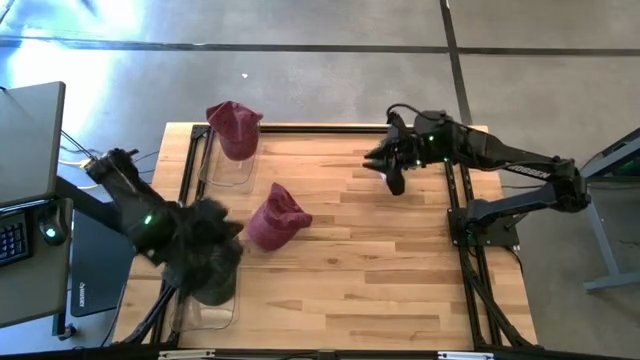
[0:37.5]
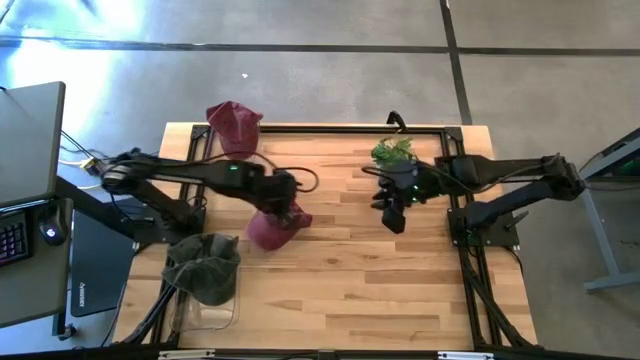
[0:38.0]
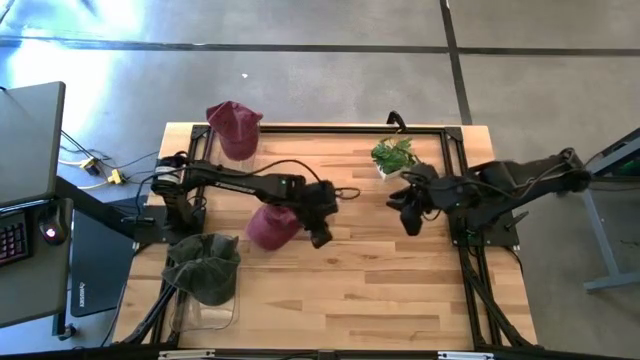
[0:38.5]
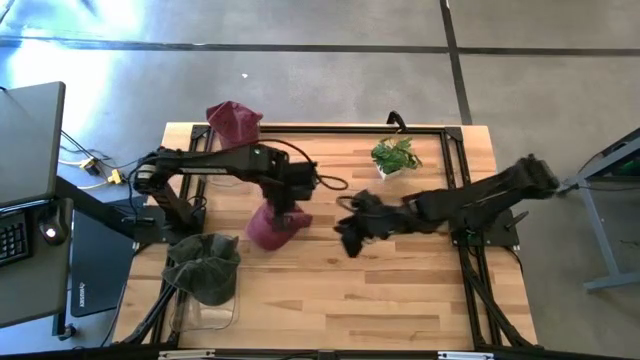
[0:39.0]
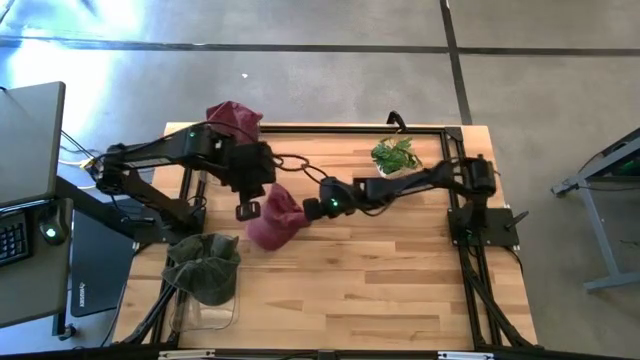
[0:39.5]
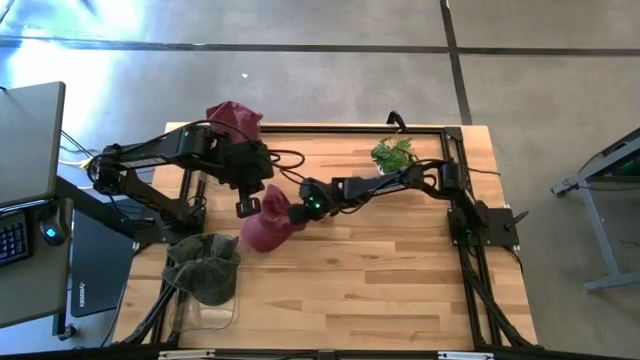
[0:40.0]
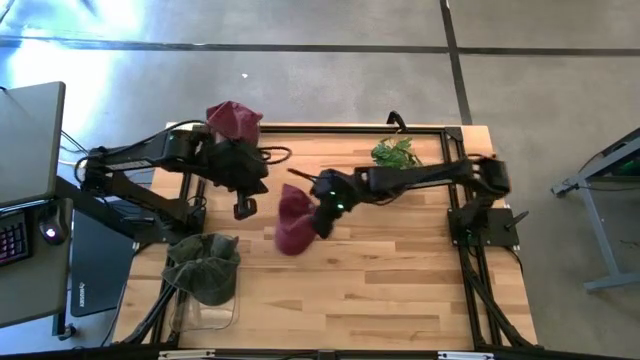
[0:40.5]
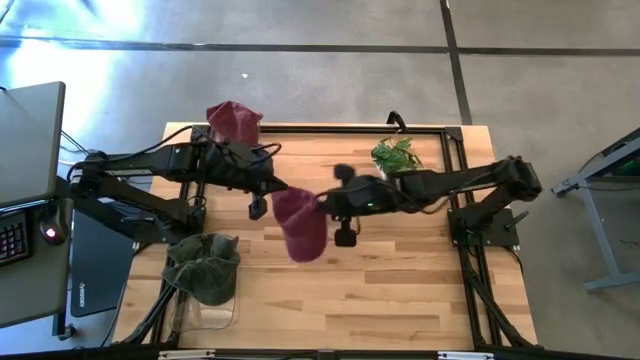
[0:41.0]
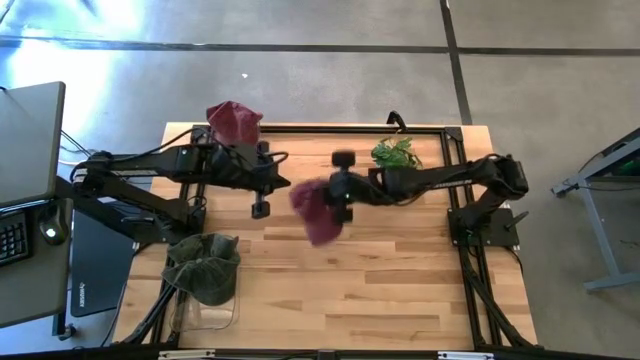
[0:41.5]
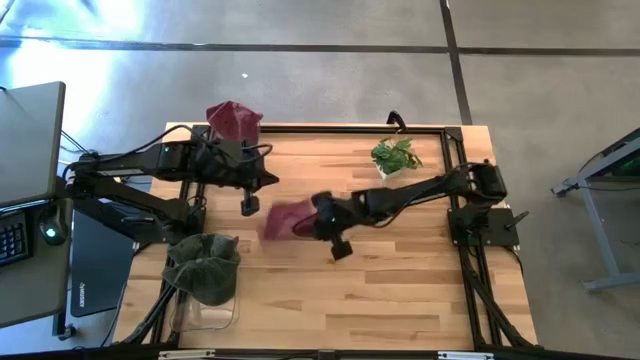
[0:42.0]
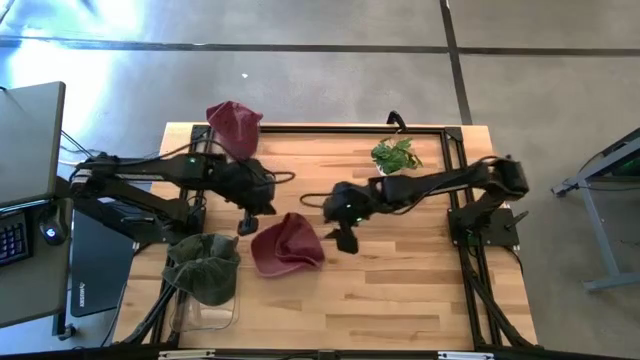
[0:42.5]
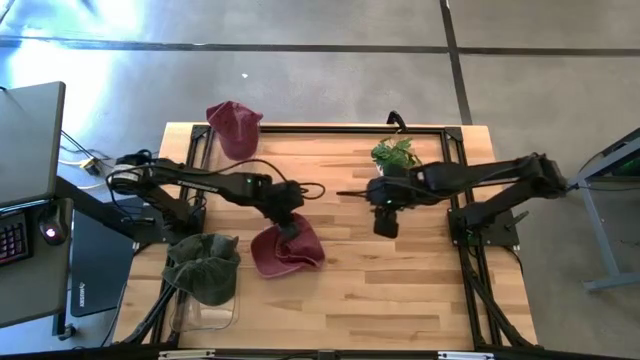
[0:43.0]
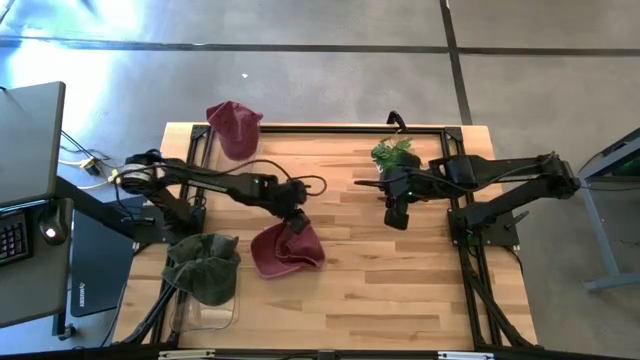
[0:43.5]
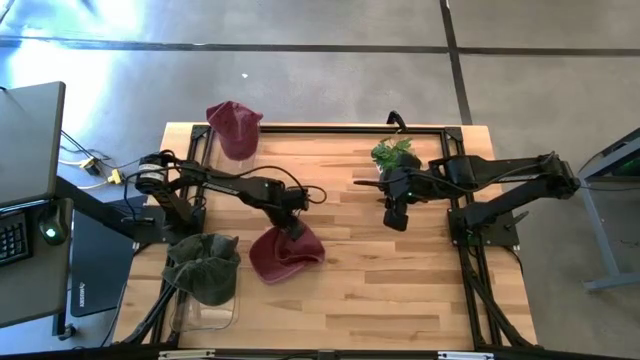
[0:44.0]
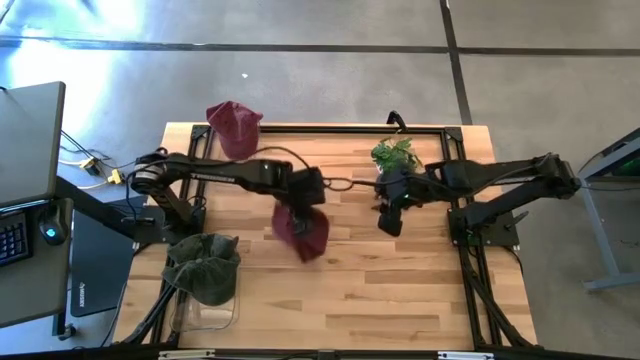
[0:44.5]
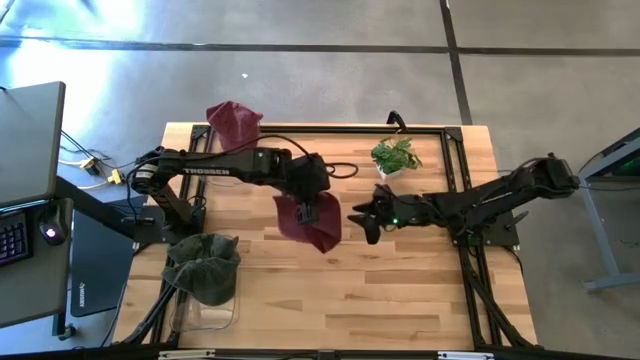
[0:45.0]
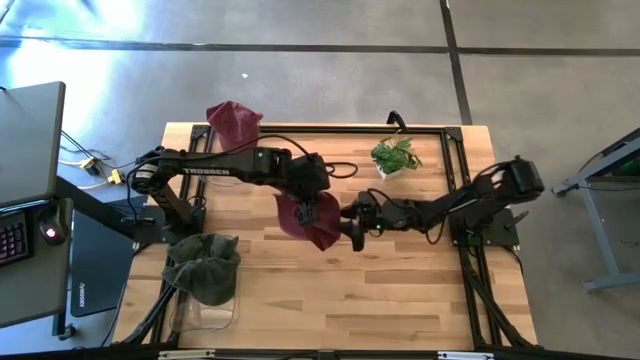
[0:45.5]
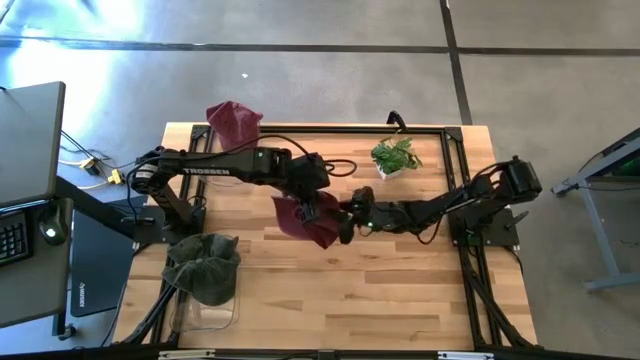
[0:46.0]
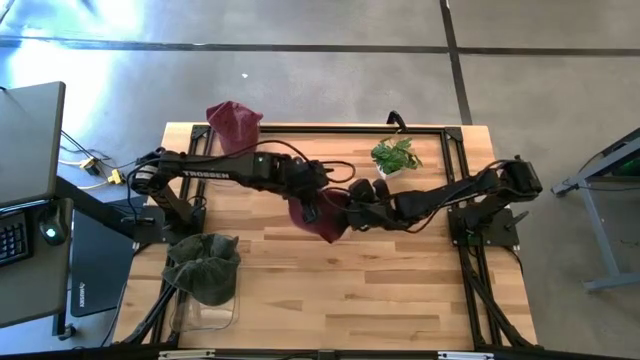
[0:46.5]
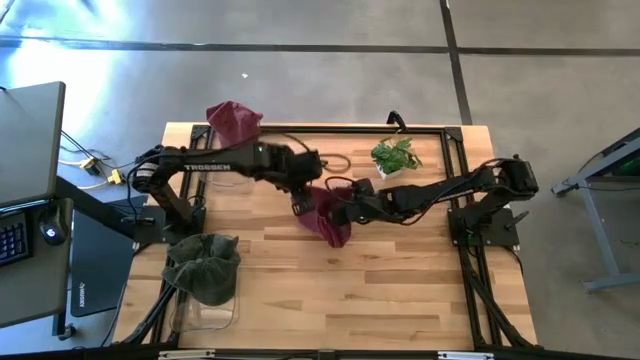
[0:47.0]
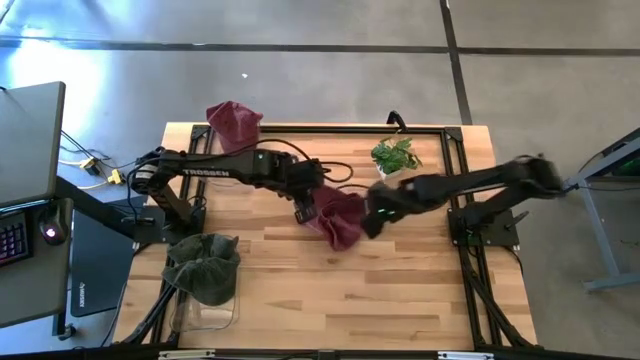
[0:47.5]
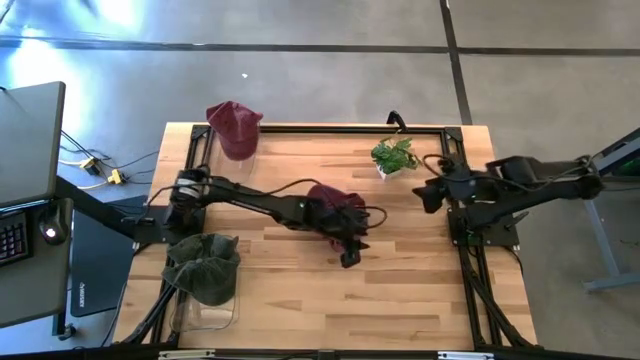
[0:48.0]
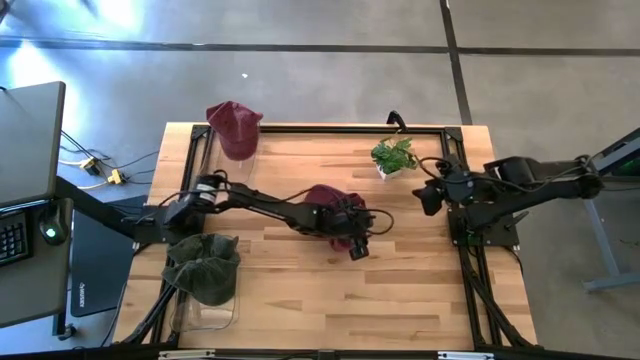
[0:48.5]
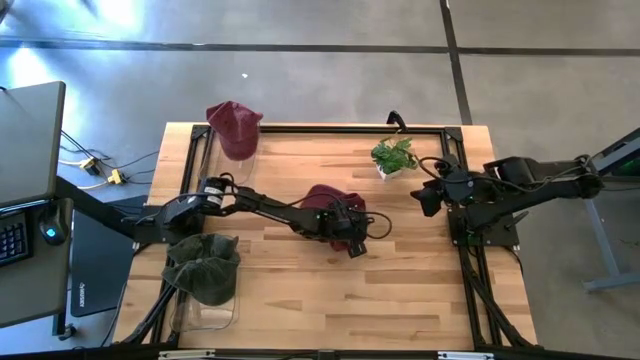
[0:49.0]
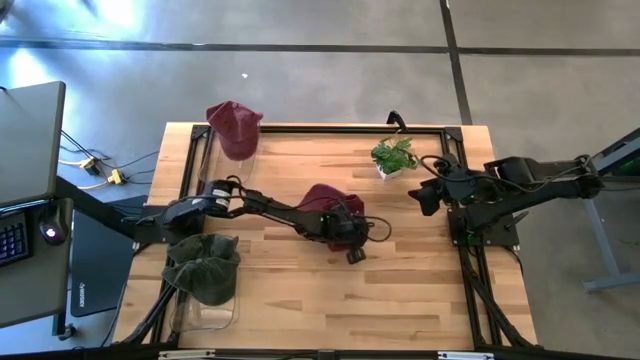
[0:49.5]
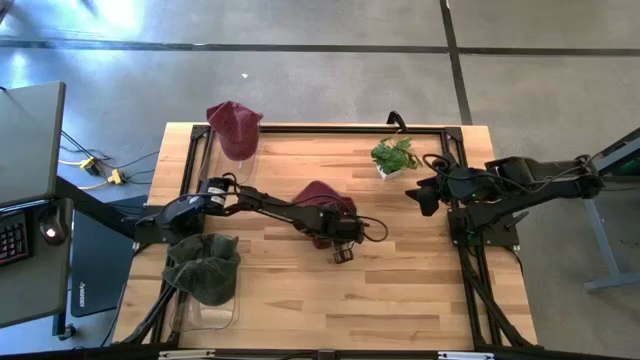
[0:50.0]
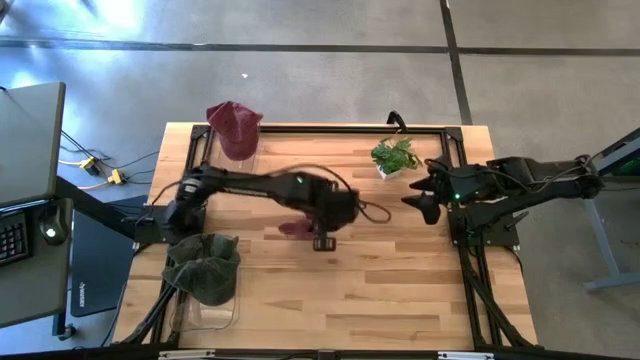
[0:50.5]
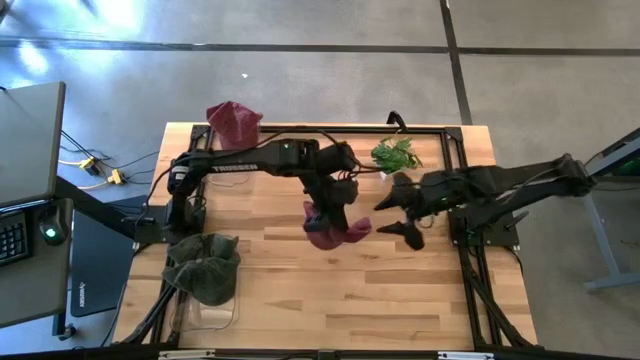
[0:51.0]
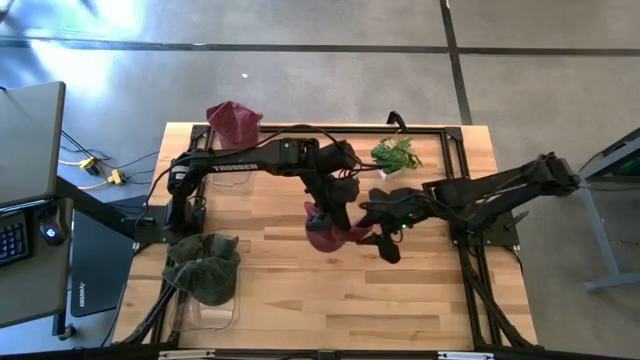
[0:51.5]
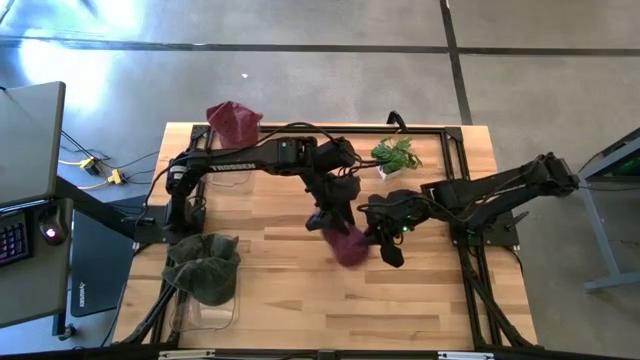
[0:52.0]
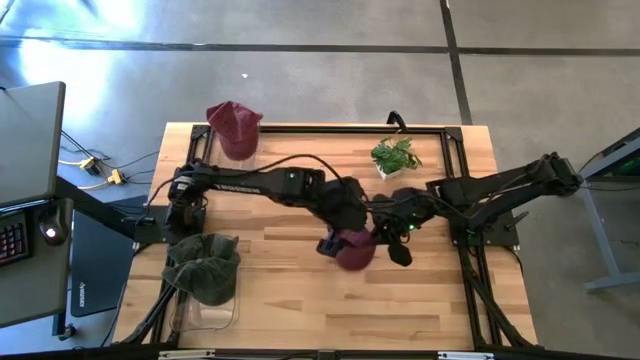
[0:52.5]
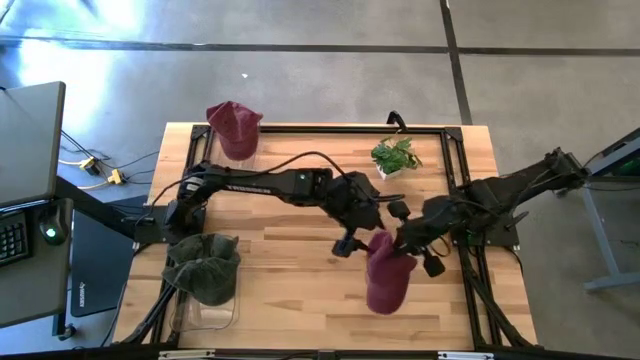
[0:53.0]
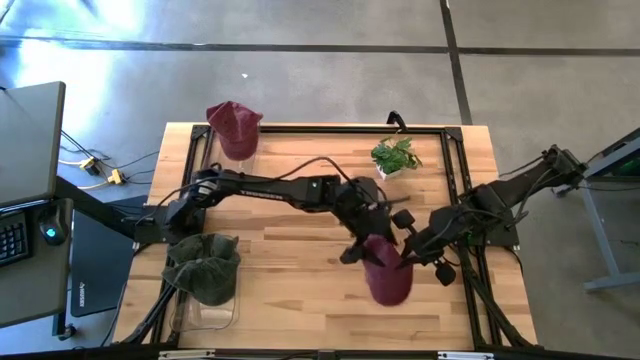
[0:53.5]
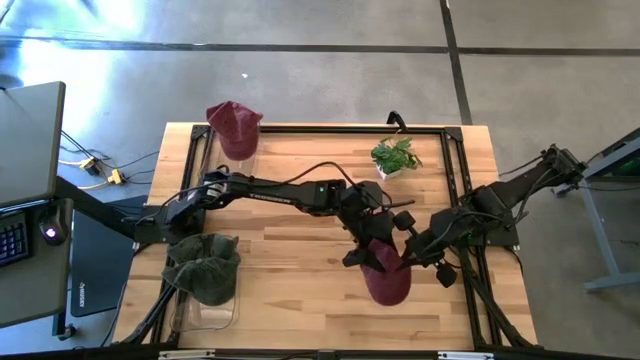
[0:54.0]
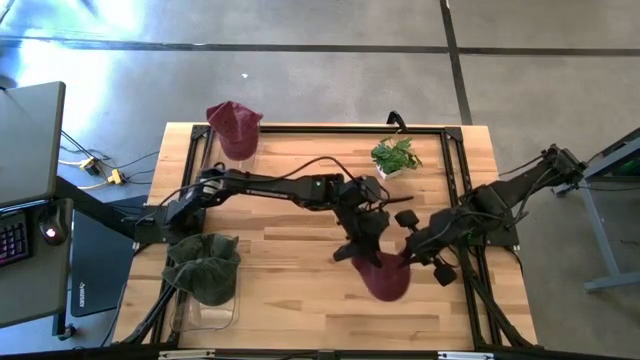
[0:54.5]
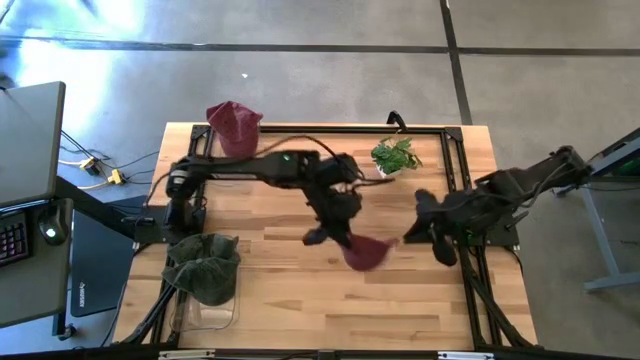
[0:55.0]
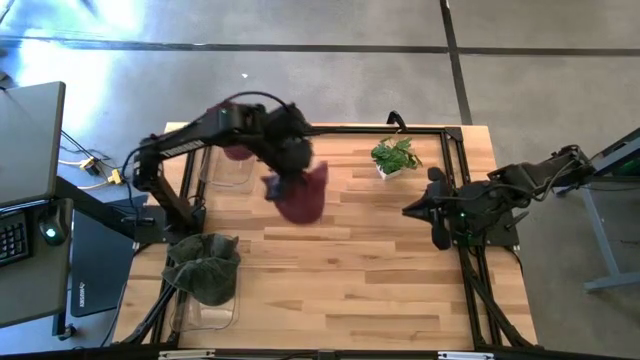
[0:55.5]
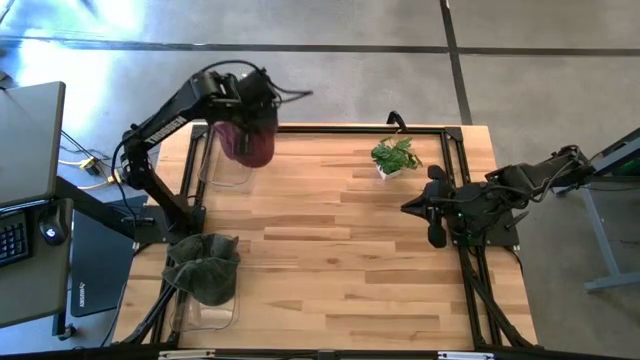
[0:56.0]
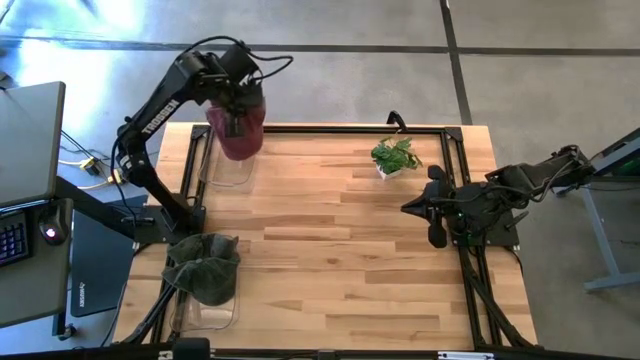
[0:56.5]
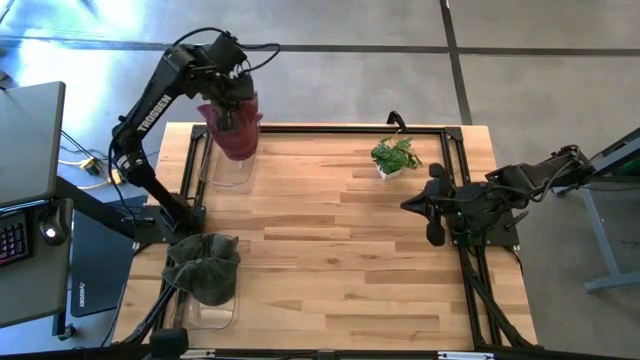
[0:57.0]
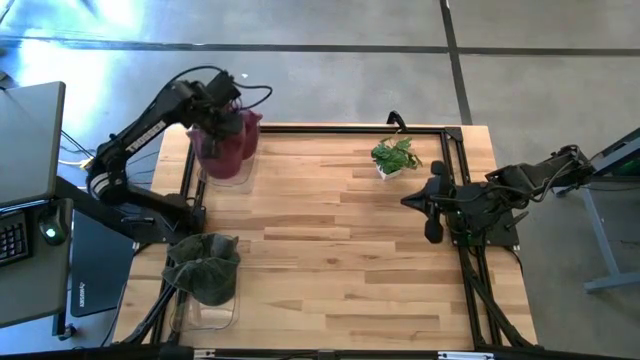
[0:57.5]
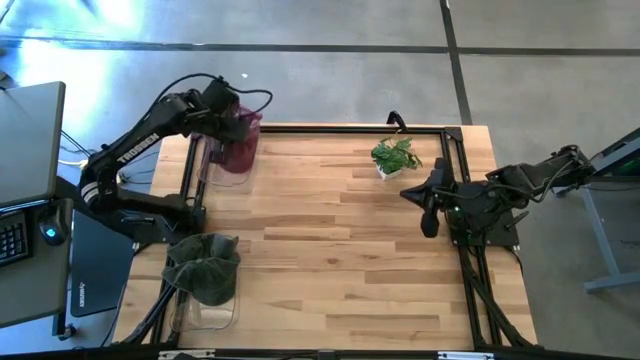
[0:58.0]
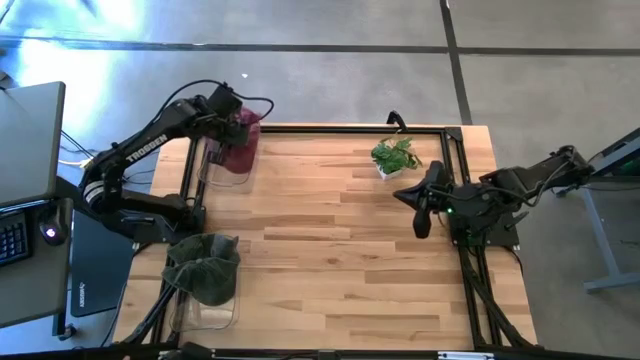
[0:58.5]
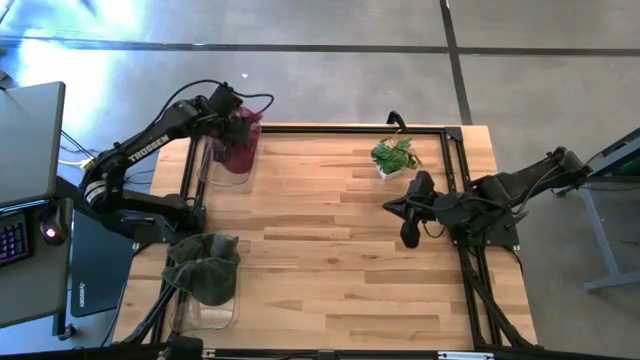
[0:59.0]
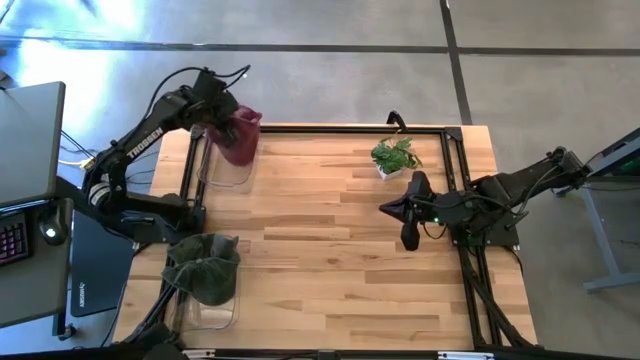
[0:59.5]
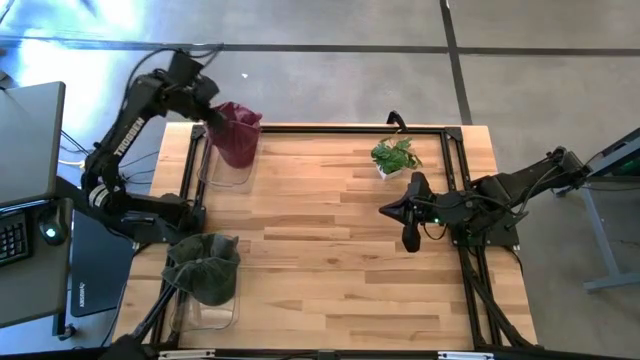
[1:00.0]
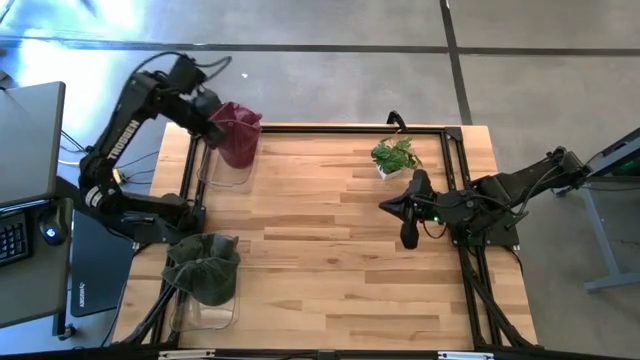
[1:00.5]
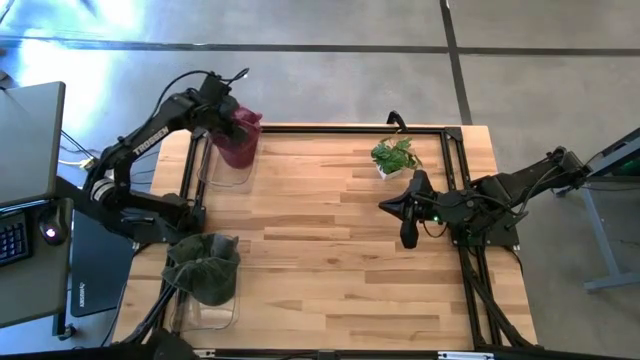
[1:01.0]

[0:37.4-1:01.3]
Task: Pick & Place hat
Put the red cap into the top transparent bin
